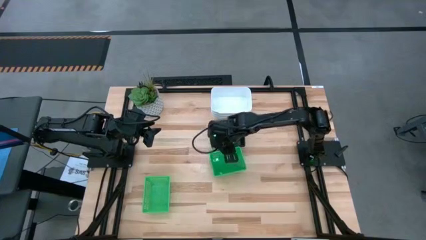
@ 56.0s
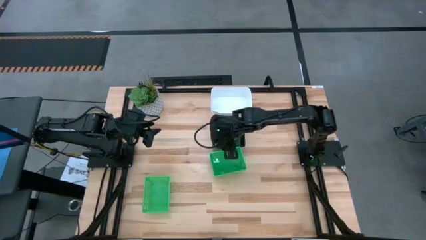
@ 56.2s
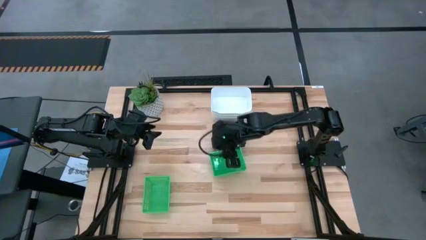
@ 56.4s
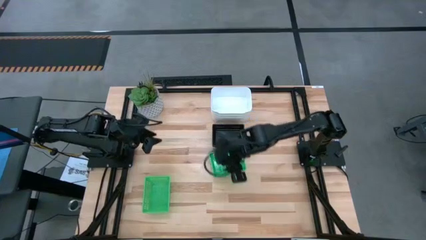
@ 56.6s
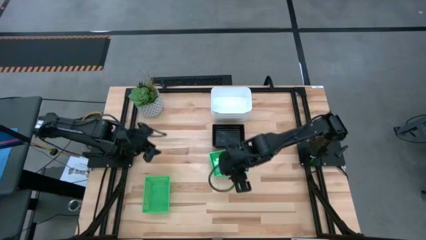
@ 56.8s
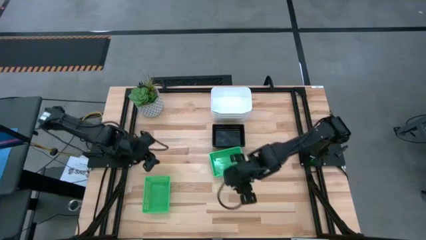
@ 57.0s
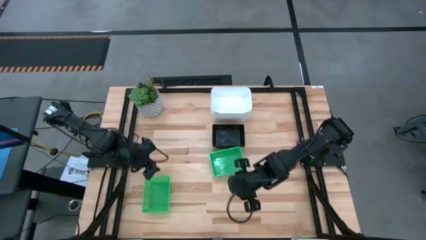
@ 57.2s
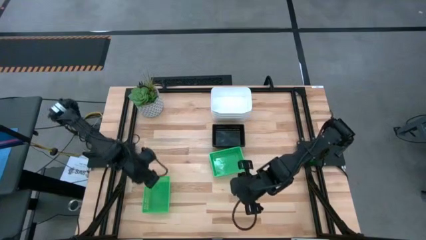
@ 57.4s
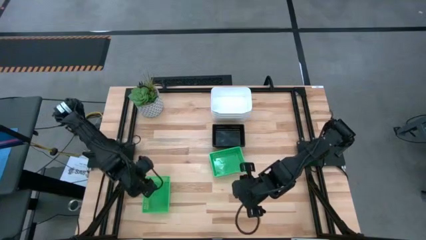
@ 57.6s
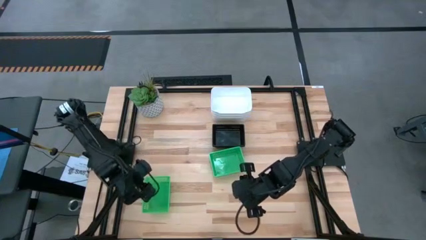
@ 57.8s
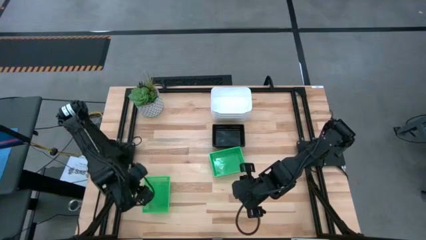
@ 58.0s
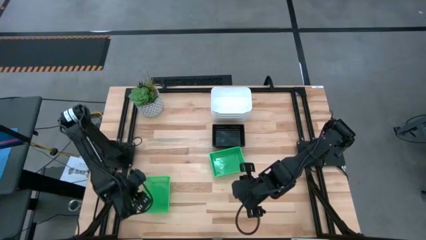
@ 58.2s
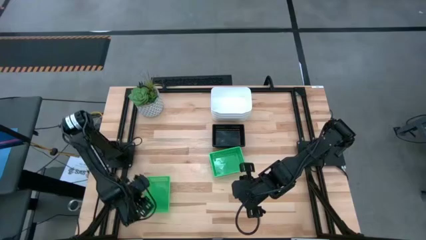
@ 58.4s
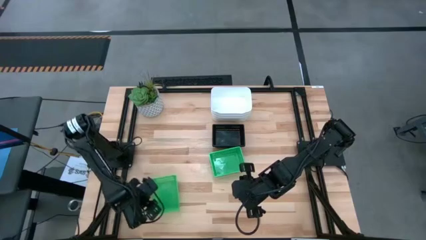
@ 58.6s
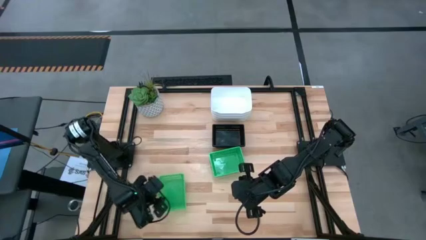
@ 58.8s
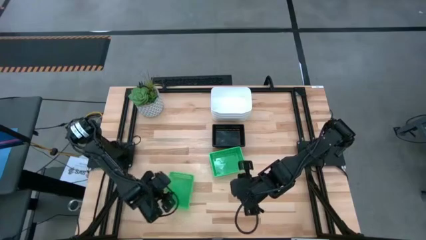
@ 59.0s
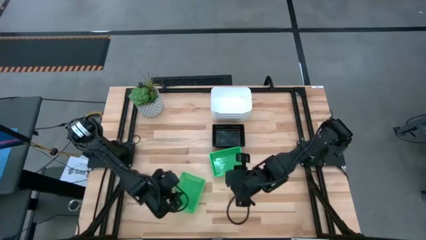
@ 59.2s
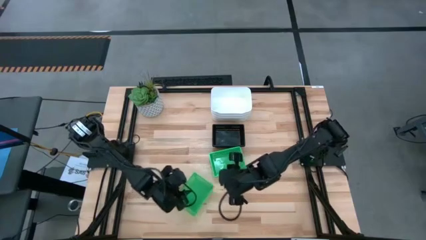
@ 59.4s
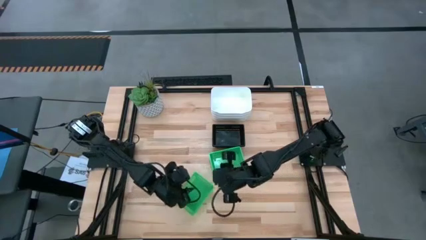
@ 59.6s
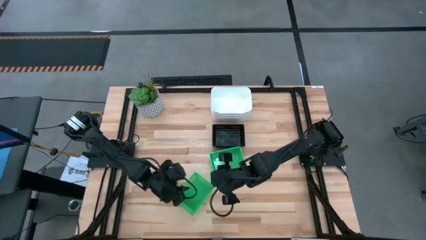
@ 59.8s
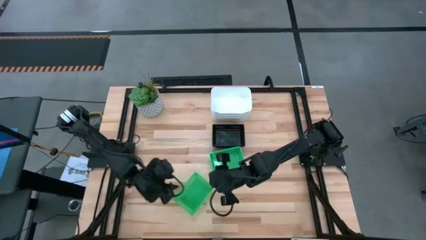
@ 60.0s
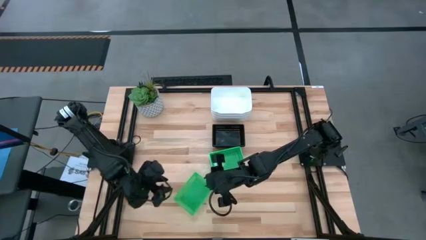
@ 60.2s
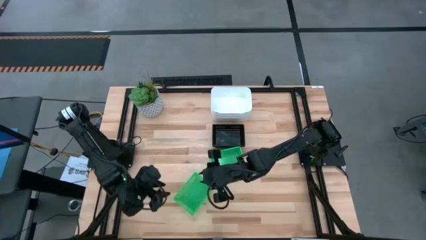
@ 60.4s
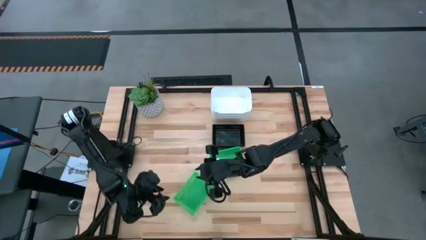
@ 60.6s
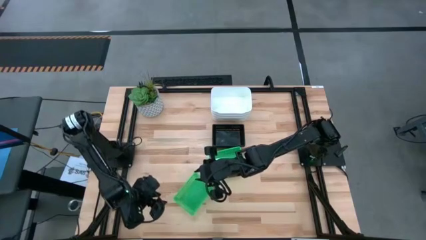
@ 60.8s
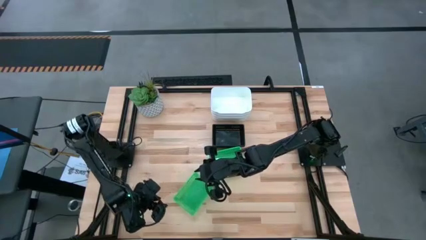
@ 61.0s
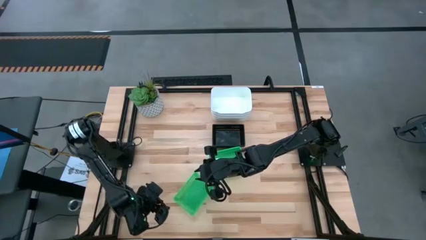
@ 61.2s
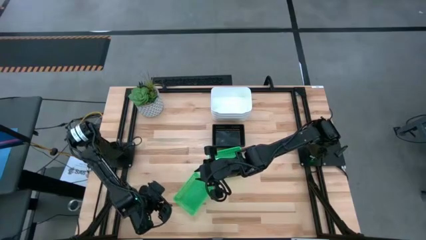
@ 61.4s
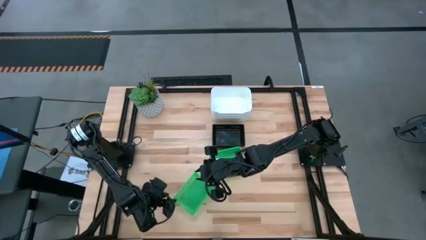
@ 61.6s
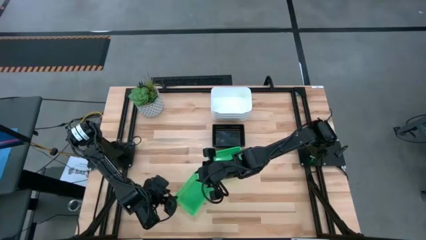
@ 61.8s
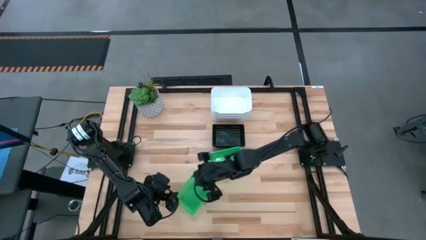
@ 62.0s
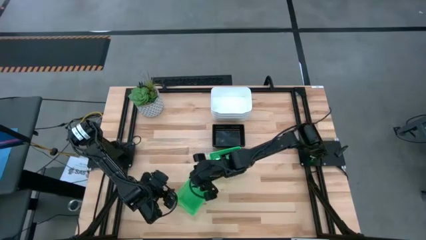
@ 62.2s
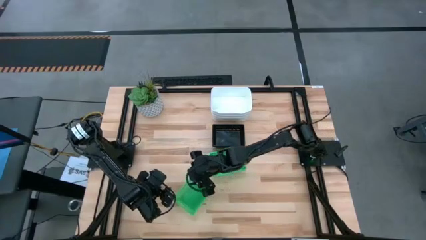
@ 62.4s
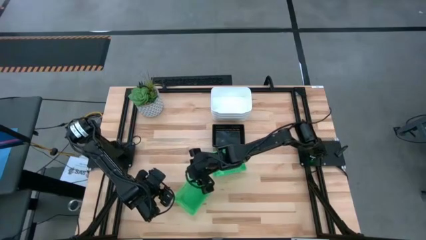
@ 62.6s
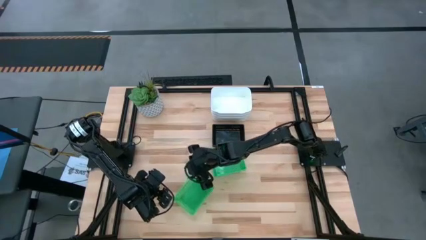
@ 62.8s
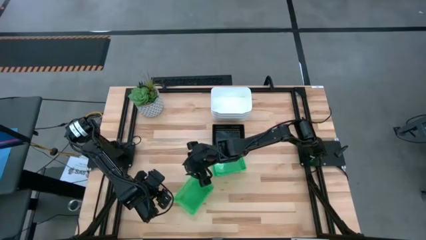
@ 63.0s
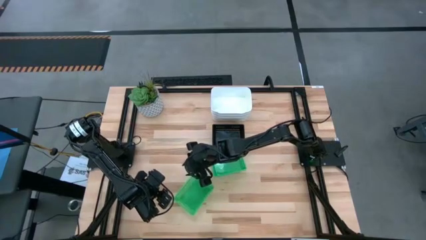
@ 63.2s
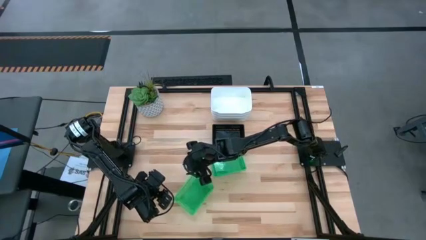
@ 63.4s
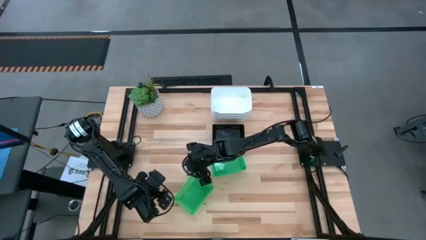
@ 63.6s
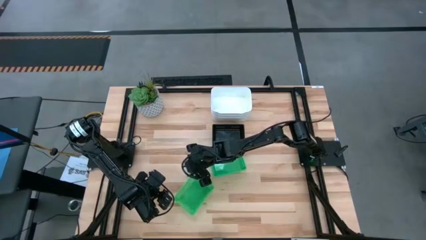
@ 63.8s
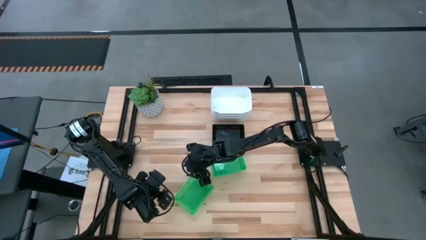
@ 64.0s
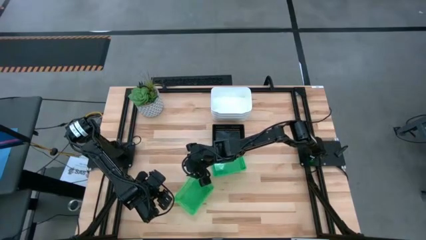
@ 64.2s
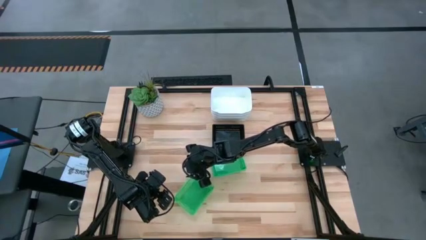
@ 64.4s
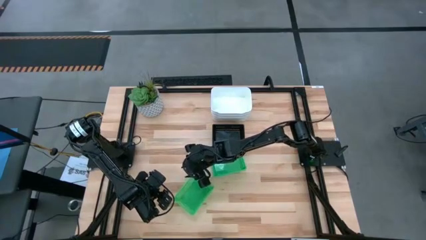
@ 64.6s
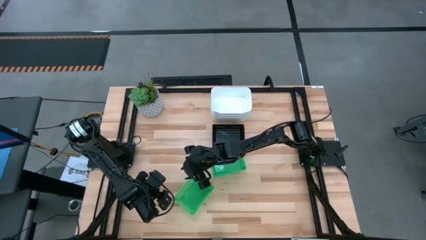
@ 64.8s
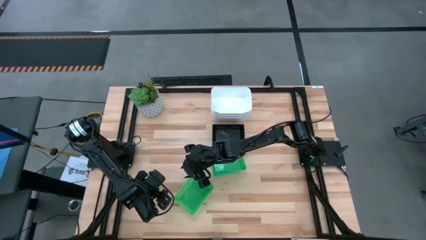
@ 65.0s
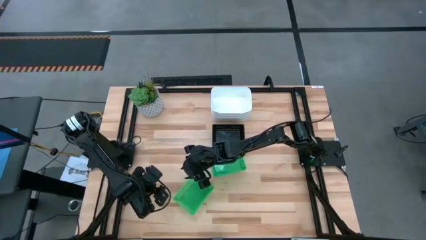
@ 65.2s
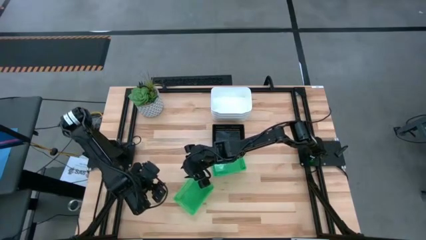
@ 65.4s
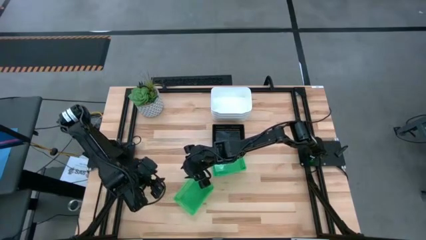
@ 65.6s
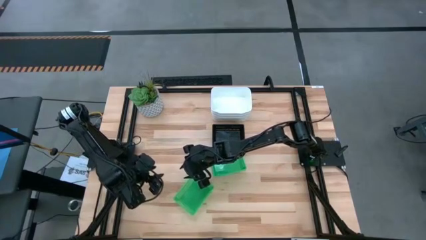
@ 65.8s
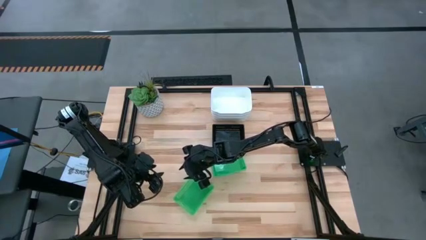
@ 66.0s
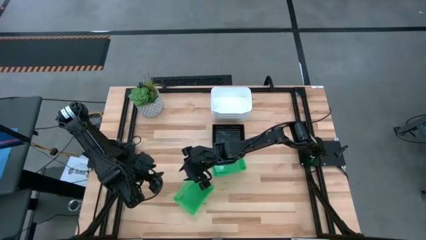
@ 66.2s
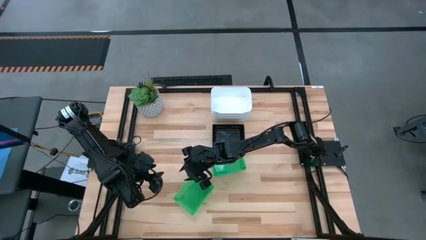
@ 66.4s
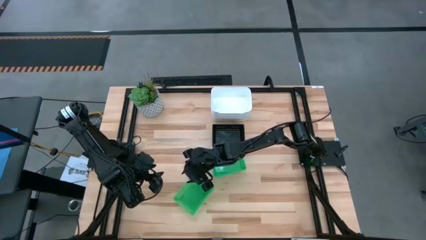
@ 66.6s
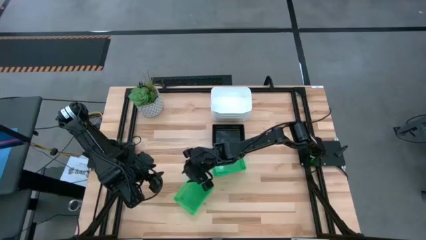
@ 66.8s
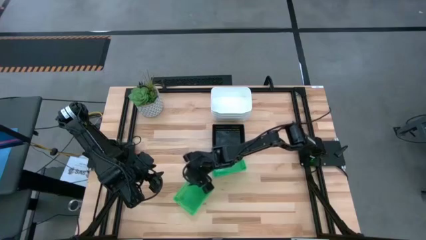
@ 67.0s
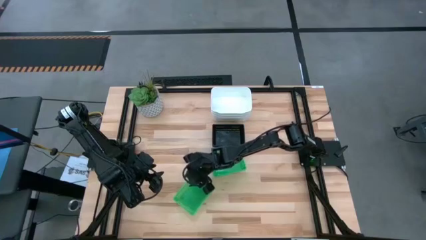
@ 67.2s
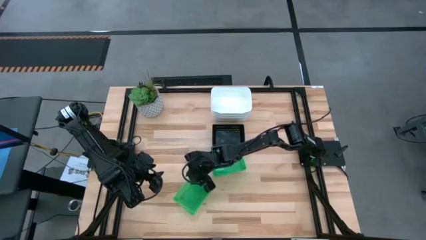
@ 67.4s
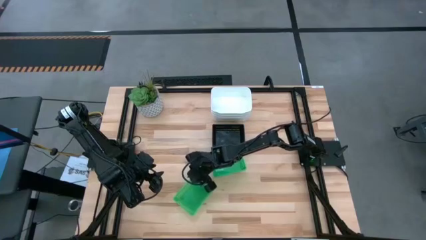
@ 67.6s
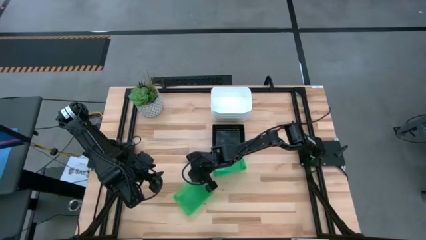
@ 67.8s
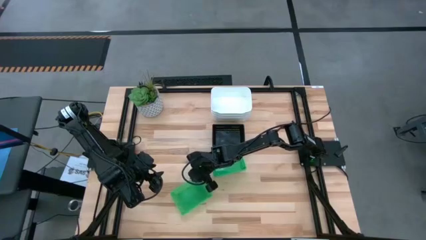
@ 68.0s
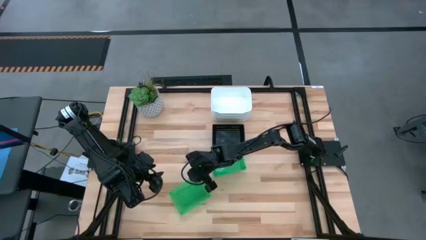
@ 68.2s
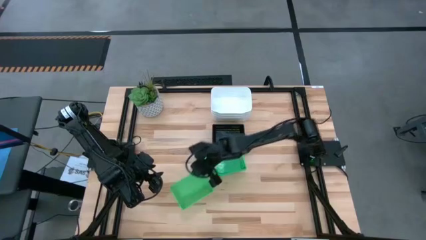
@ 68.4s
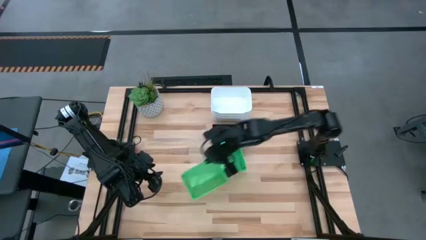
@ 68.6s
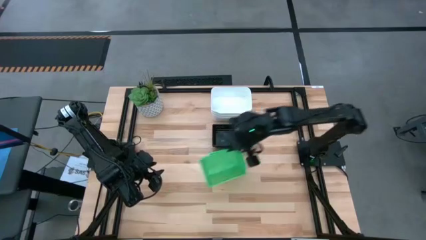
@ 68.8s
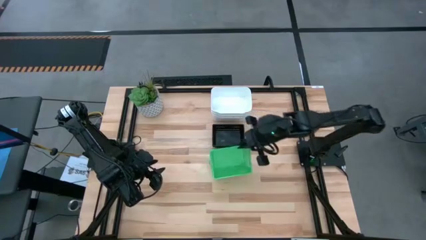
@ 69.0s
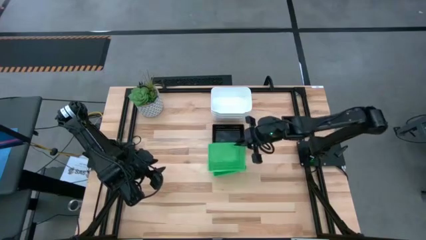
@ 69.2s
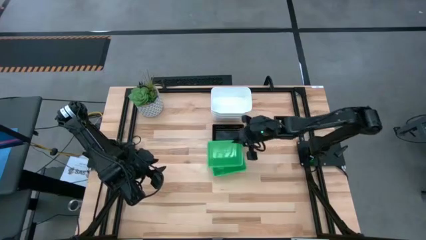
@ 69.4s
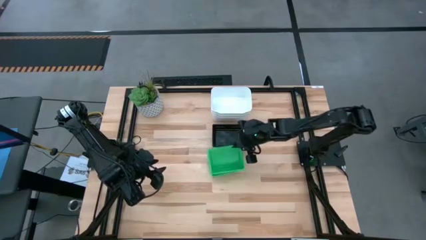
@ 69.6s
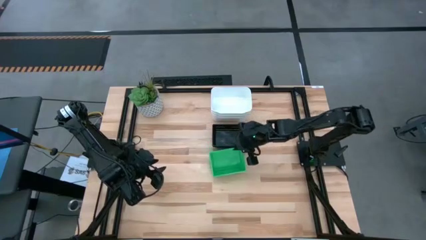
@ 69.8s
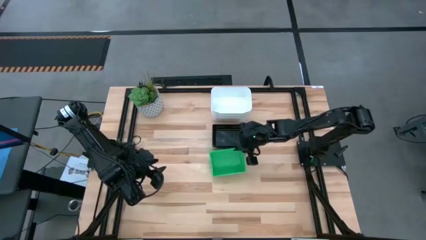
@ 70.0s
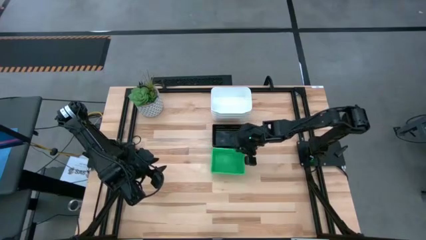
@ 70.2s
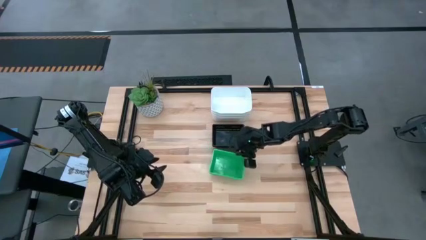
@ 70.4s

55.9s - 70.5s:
Stack the left green bin on the top green bin

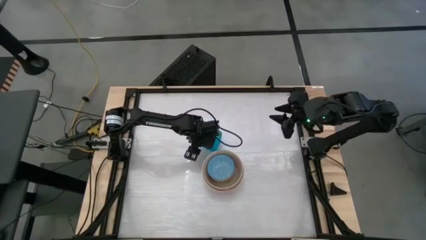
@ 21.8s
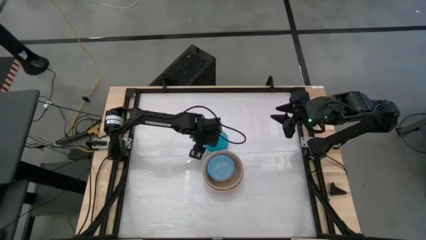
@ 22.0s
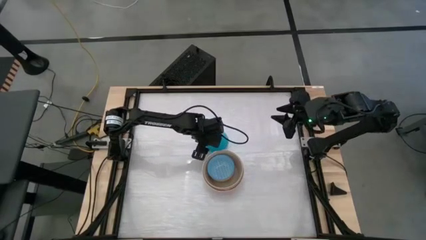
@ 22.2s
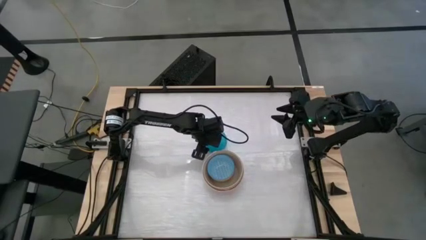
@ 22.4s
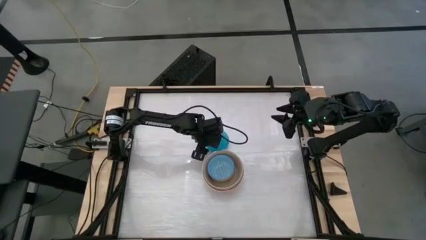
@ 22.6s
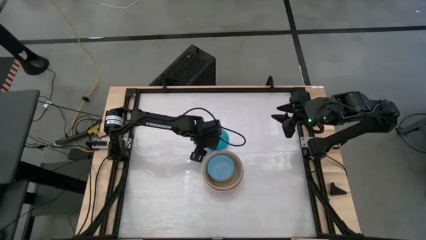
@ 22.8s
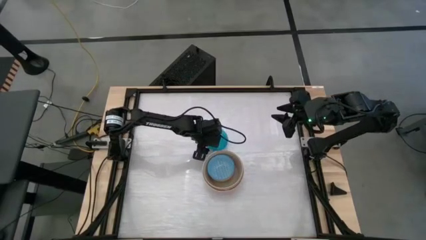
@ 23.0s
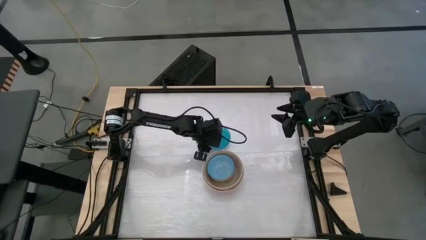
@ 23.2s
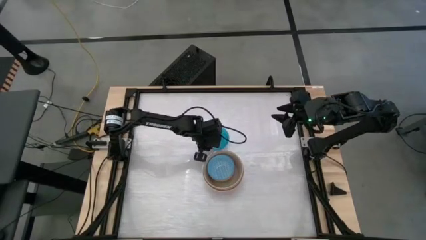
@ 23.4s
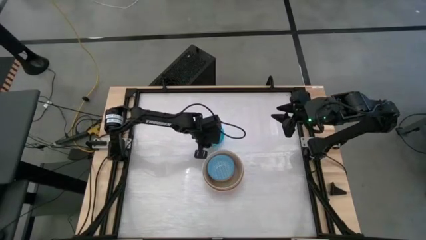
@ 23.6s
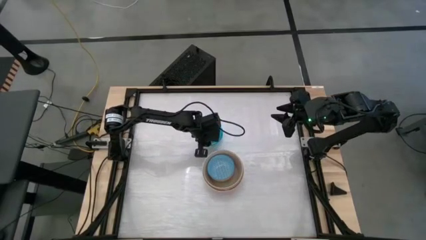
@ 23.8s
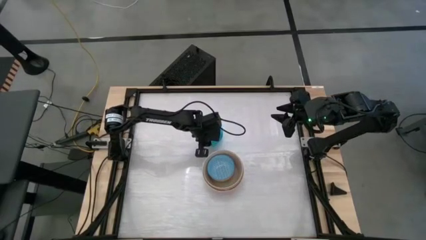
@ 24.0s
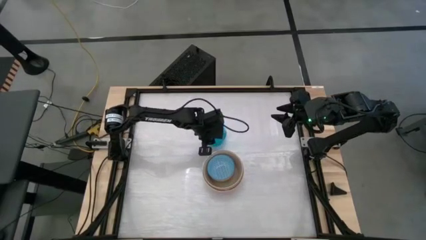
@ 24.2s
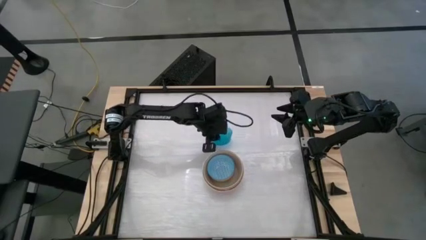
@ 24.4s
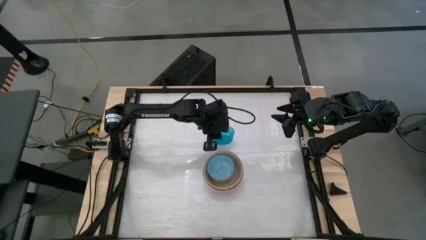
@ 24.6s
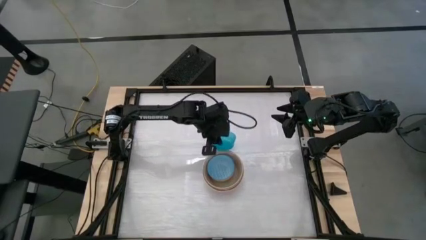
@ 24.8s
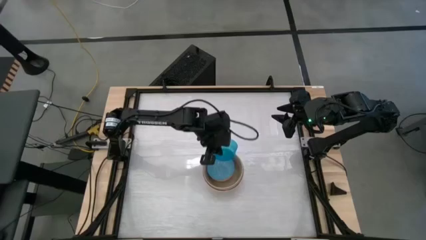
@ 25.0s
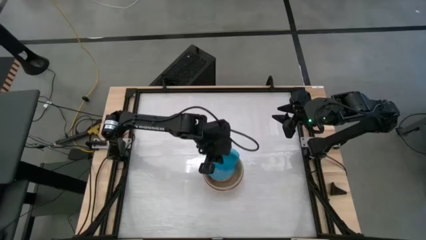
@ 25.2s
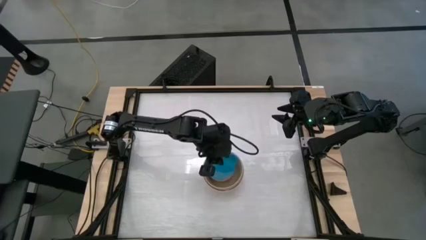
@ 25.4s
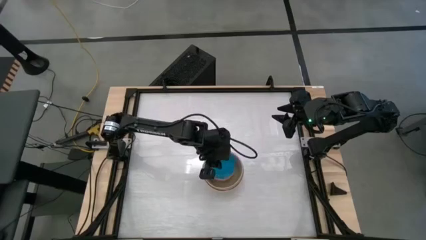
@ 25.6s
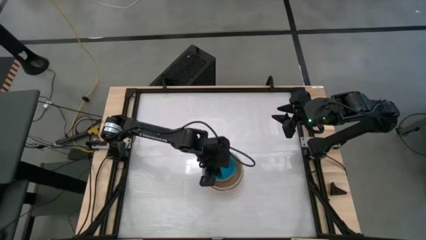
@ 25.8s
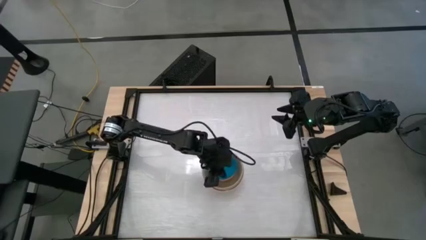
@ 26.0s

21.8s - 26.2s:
Stack the light blue bowl on top of the blue bowl
